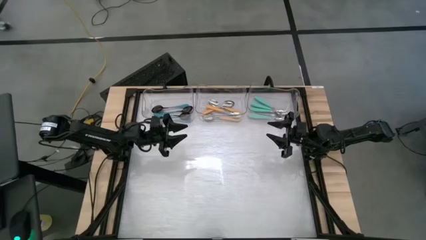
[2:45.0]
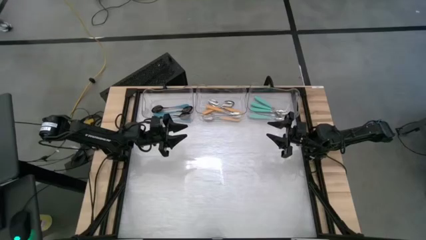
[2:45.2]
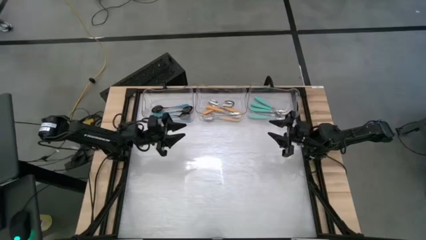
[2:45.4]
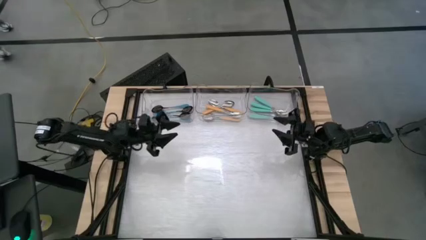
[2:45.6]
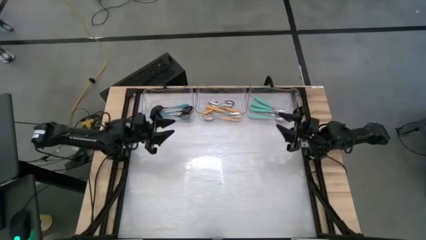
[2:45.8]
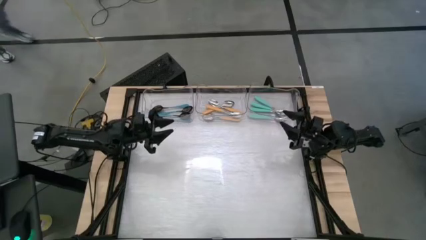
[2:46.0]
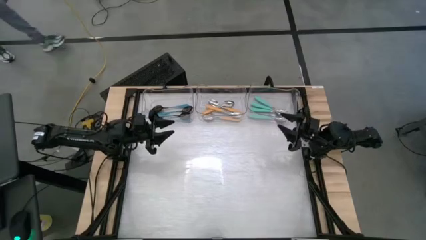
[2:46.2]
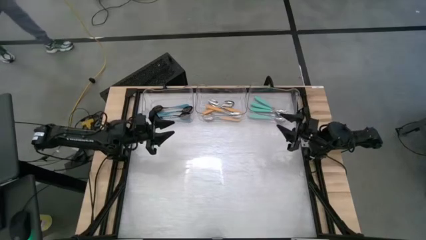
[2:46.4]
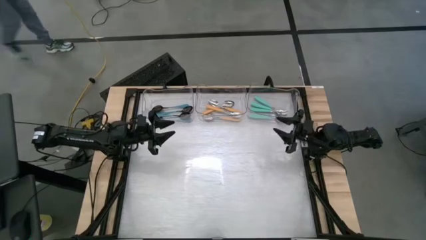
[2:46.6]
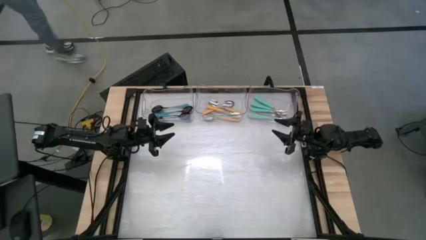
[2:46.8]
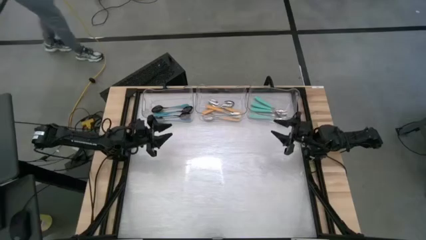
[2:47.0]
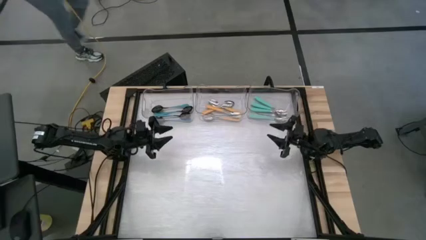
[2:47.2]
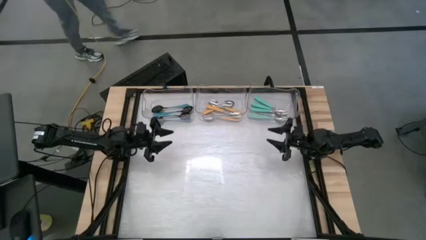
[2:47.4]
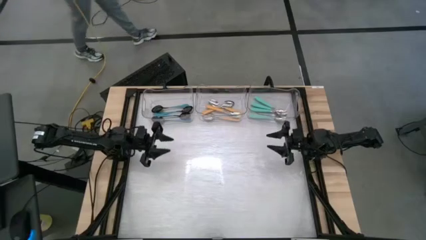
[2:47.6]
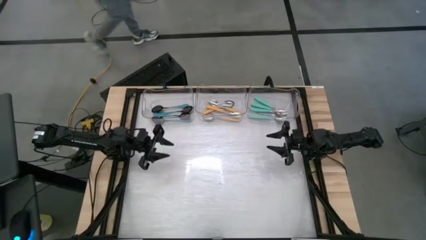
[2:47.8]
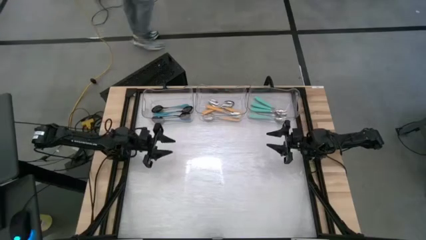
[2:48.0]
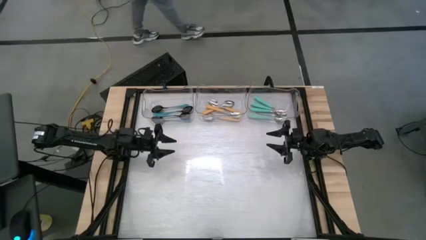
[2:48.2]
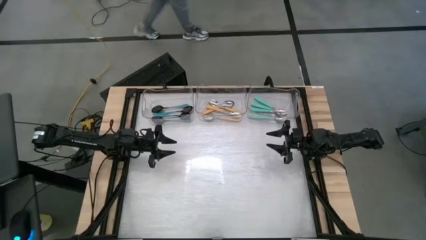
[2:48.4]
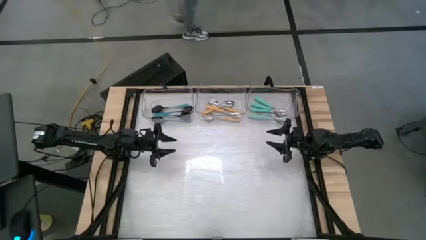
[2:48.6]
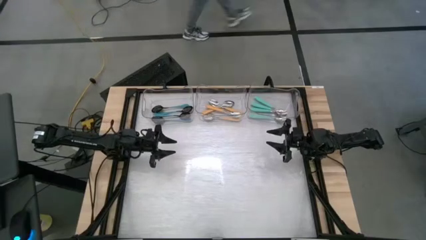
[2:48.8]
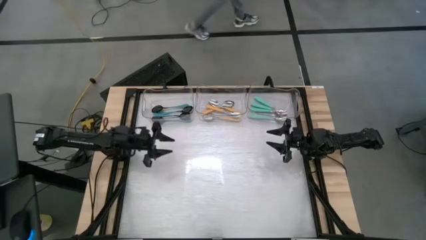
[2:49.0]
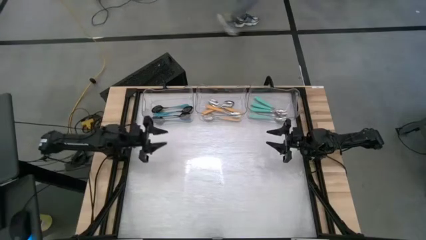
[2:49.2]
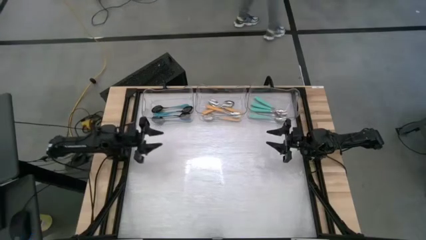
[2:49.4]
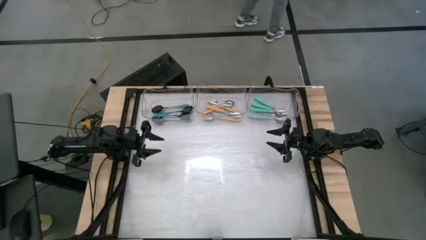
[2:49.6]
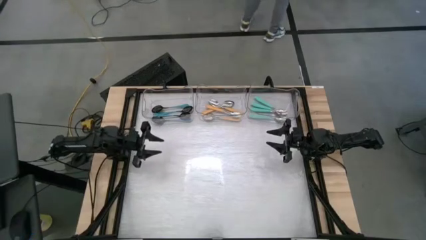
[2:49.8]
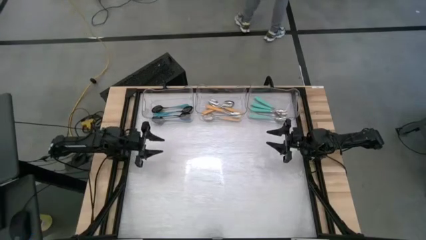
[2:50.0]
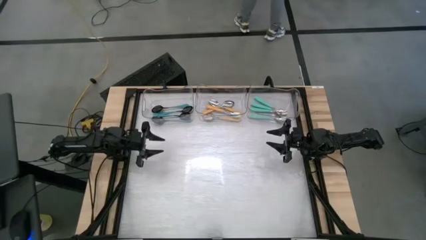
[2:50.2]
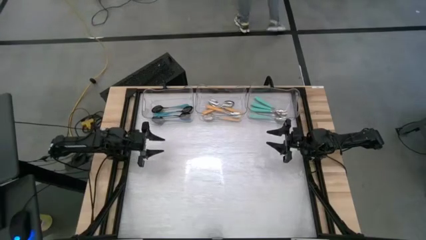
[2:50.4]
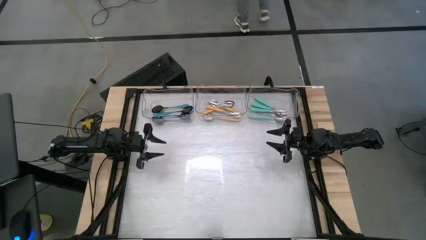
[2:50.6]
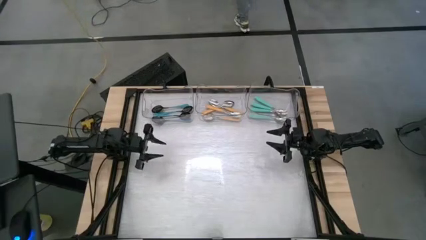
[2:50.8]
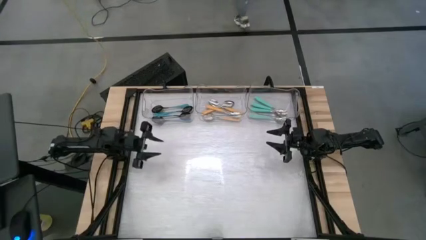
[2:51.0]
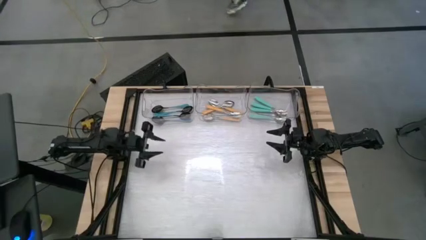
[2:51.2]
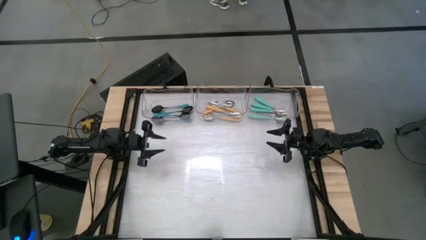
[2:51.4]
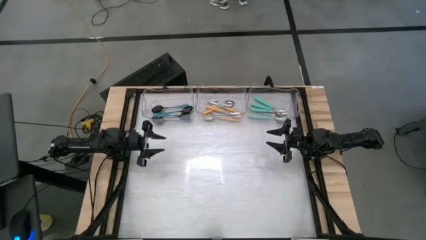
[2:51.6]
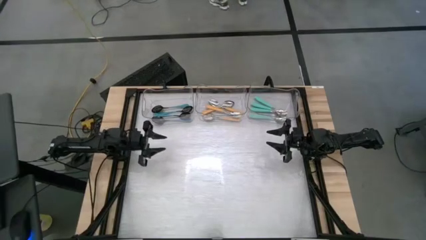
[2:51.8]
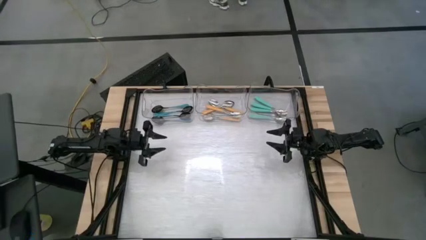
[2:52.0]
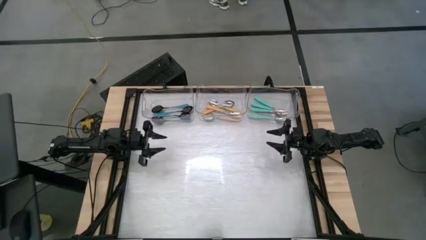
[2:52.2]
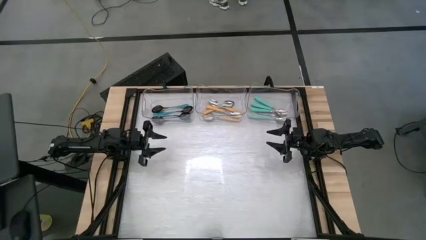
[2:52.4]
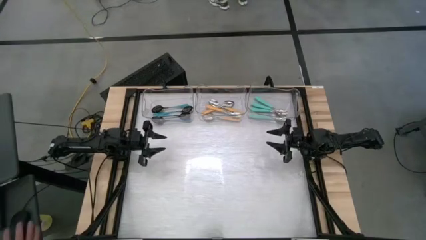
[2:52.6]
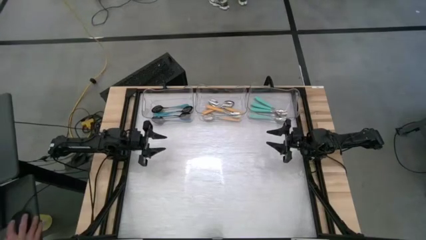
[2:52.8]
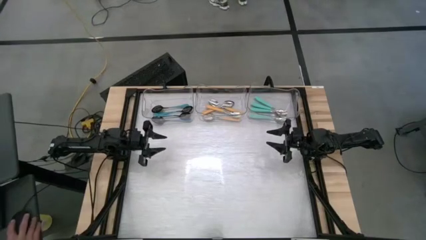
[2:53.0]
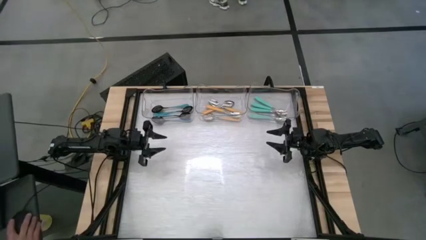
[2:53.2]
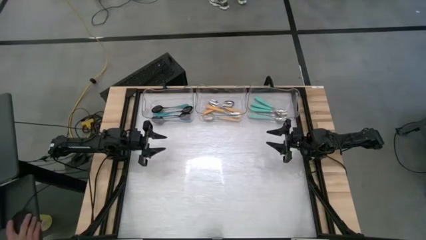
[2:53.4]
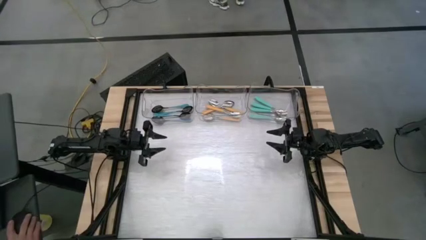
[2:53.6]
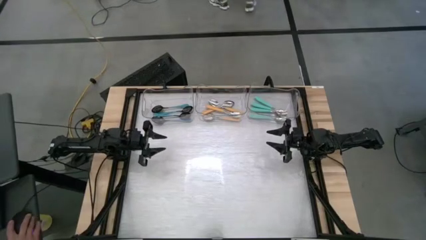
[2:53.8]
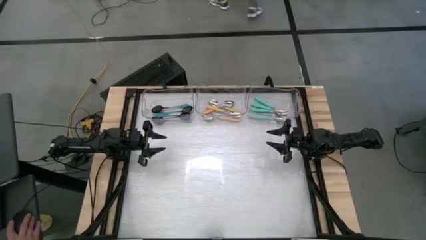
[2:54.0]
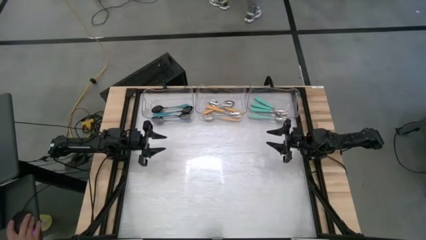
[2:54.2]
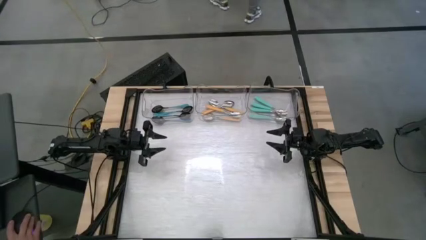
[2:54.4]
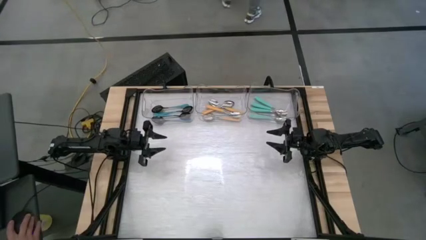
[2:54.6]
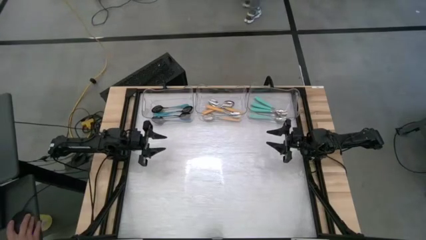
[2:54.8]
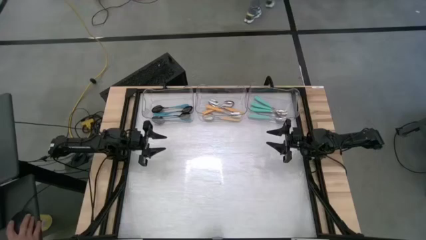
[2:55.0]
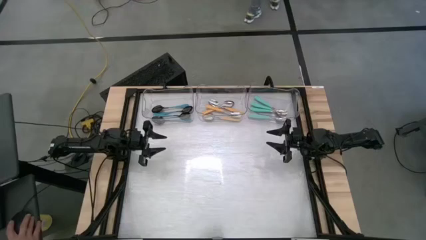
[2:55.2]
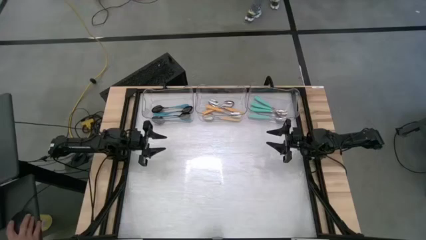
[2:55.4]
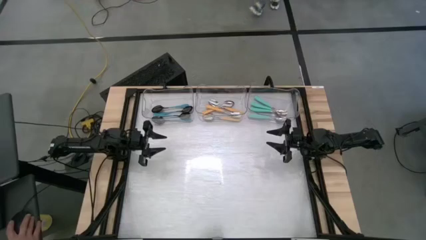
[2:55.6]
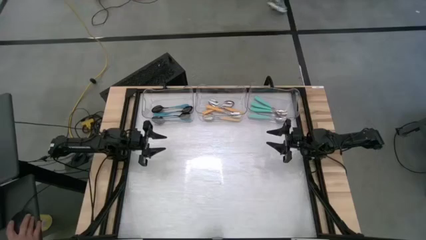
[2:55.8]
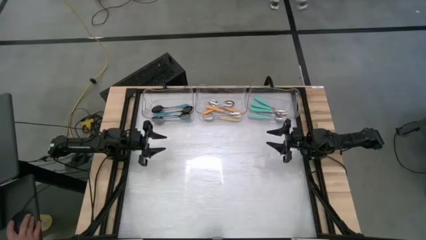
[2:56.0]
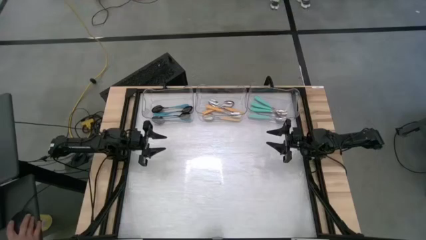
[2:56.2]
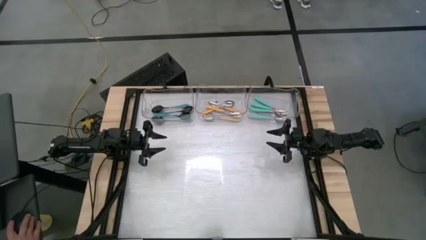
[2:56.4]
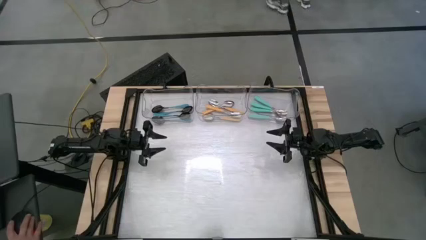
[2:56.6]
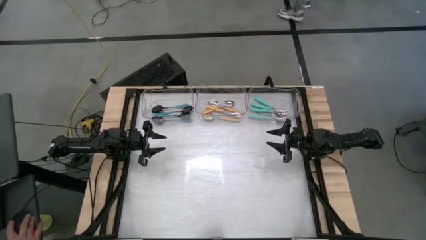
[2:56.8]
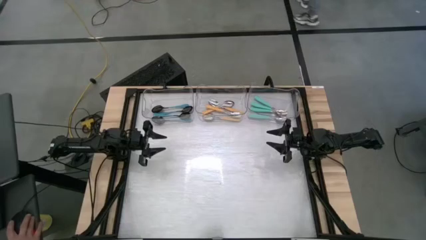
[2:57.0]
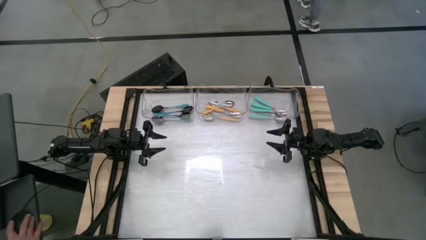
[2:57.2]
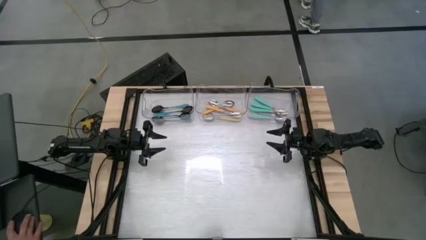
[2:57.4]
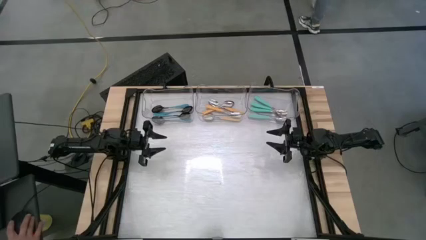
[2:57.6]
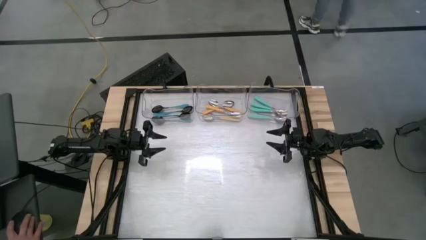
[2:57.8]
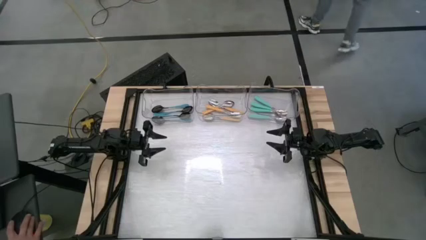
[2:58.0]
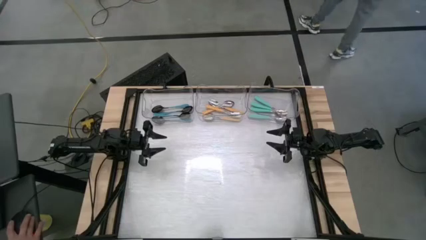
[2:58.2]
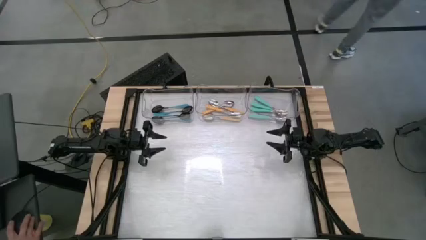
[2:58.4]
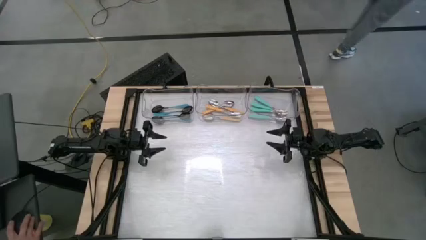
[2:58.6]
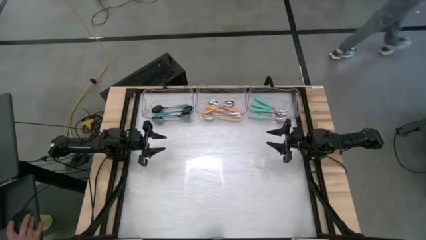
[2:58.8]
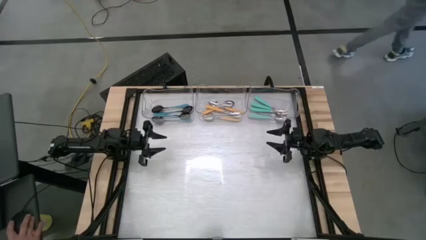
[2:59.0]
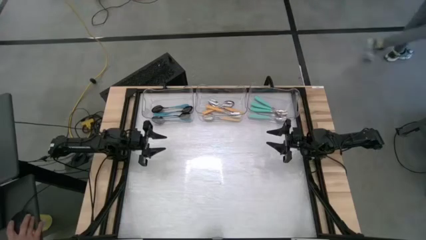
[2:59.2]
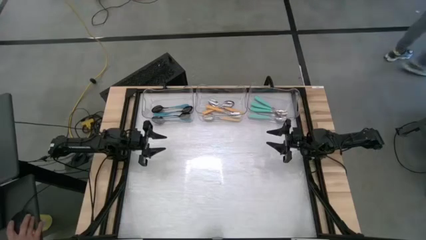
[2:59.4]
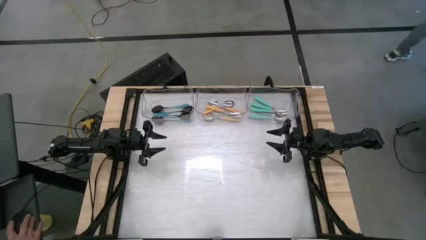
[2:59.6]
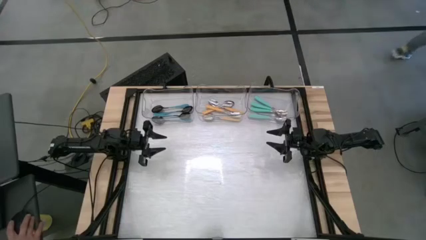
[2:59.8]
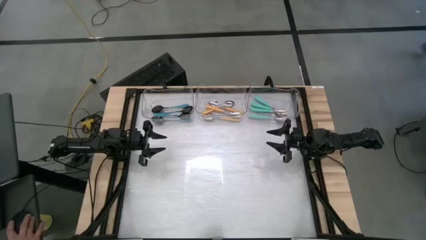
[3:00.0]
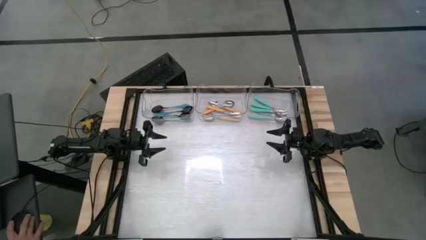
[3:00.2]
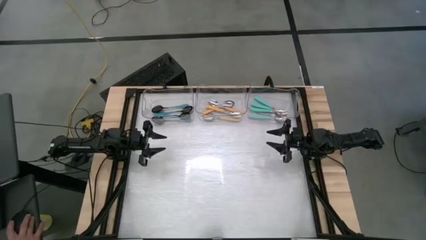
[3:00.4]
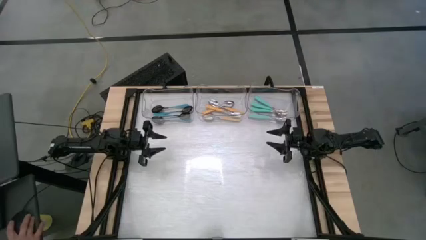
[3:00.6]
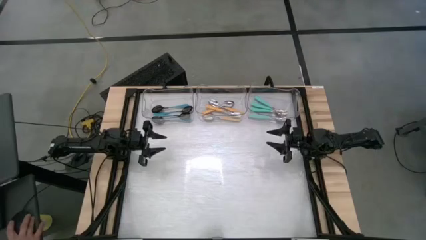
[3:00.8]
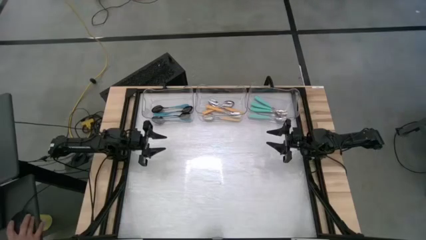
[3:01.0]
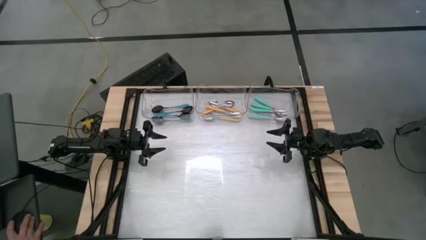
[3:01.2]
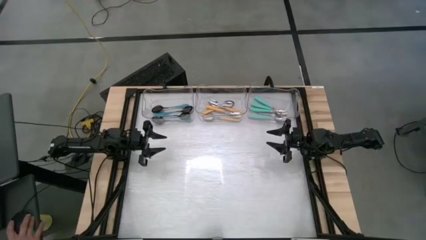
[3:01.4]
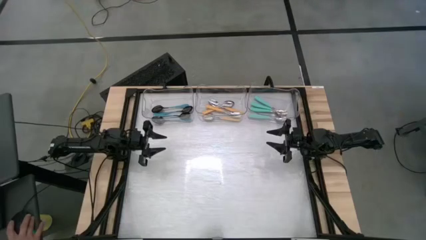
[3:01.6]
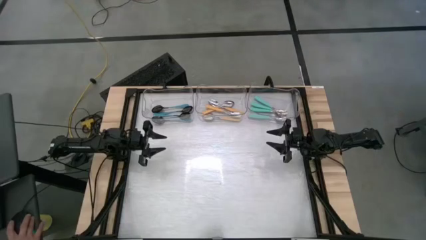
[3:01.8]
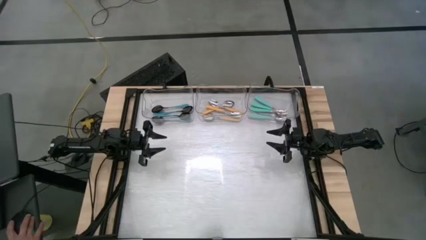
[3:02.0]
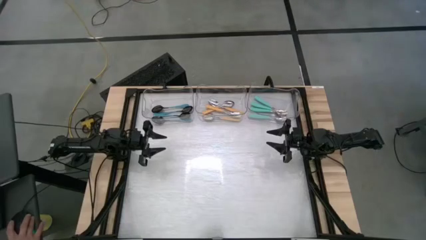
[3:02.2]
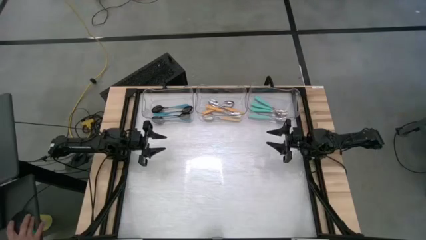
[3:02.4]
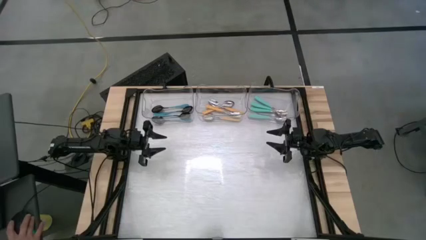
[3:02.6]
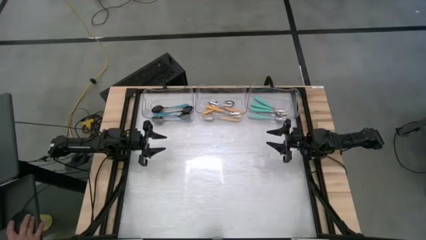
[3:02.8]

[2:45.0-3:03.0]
Task: Sort silverware by color (type)
Return to Home Position
